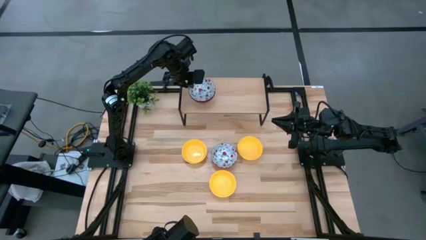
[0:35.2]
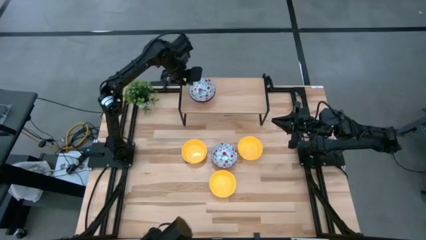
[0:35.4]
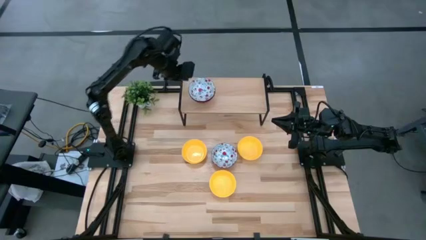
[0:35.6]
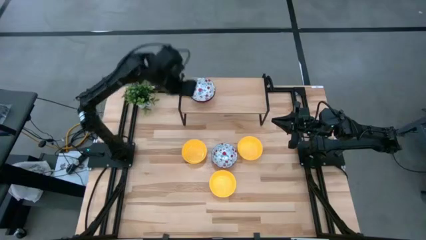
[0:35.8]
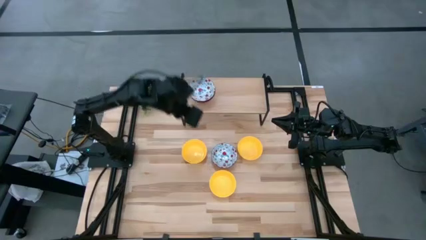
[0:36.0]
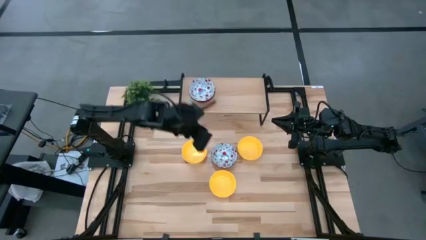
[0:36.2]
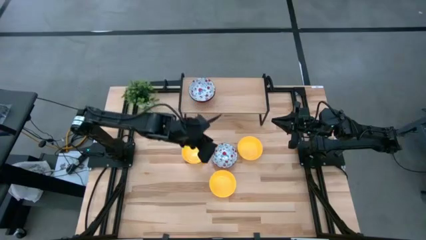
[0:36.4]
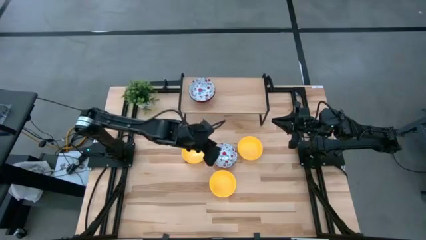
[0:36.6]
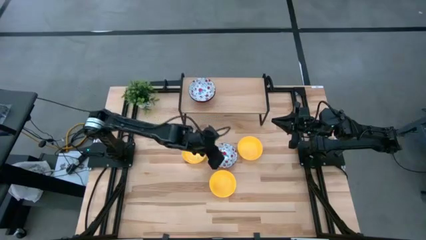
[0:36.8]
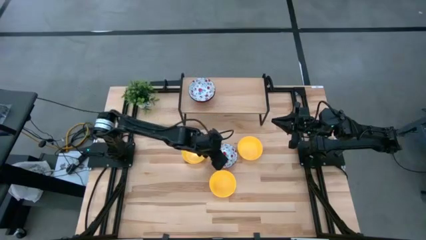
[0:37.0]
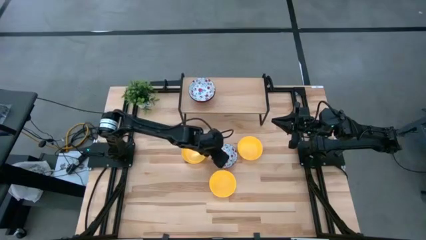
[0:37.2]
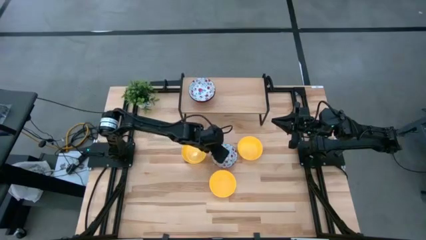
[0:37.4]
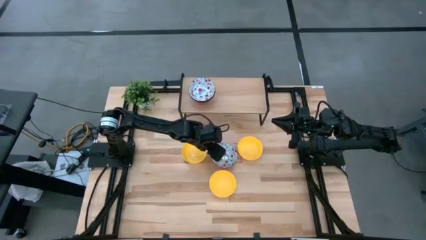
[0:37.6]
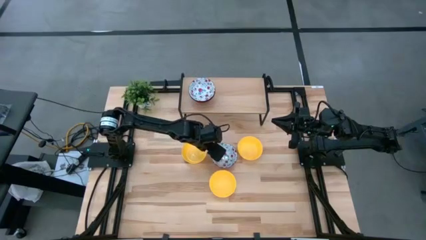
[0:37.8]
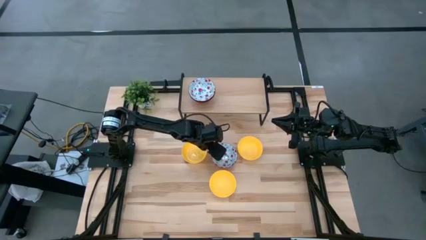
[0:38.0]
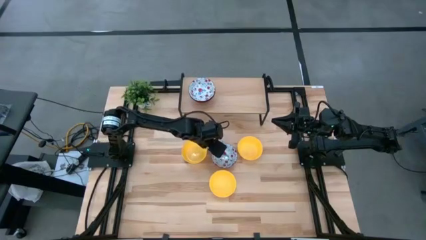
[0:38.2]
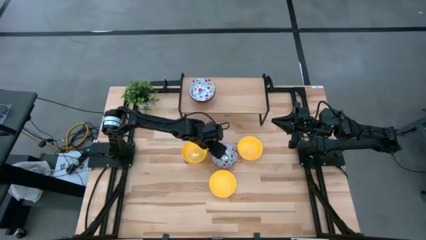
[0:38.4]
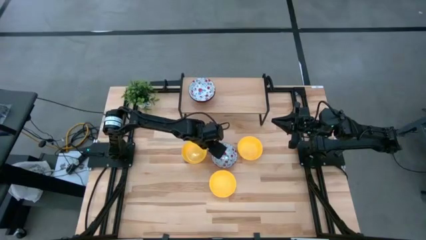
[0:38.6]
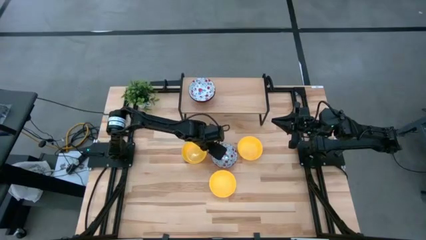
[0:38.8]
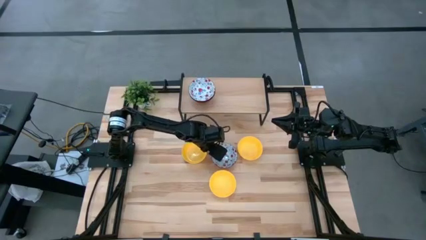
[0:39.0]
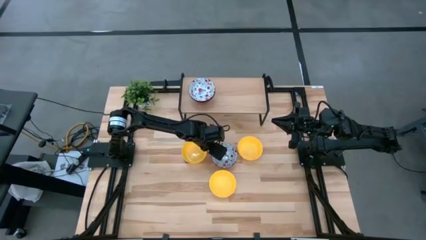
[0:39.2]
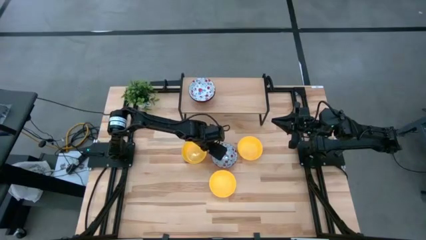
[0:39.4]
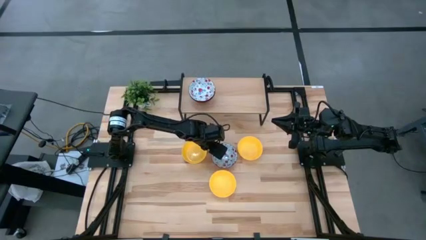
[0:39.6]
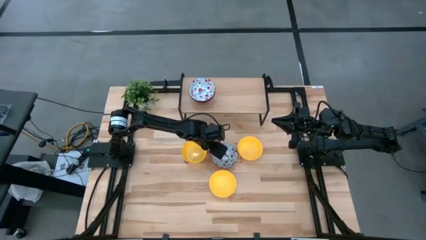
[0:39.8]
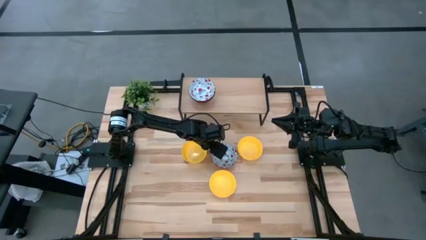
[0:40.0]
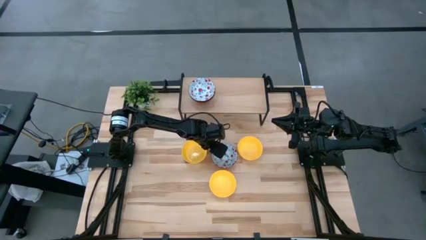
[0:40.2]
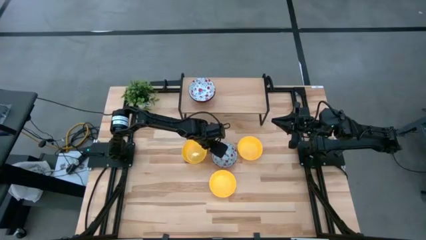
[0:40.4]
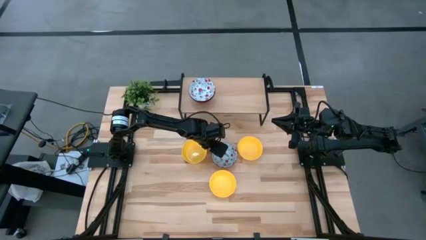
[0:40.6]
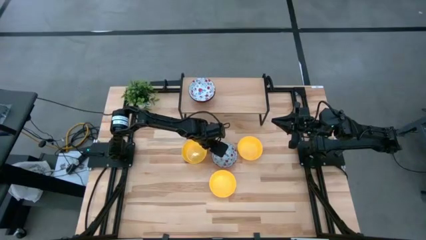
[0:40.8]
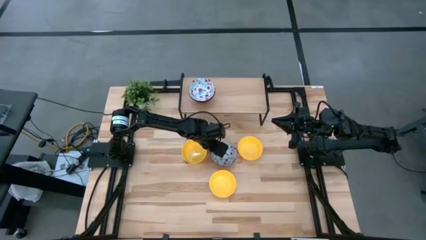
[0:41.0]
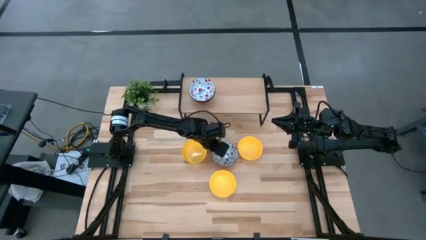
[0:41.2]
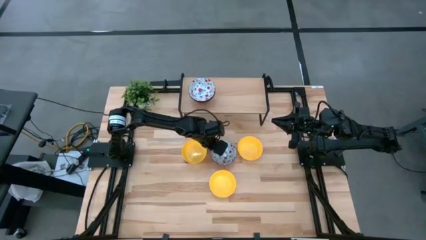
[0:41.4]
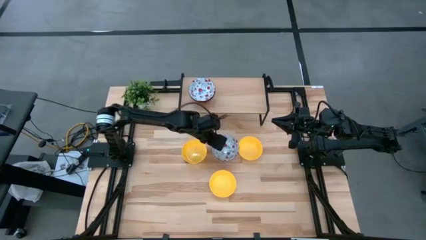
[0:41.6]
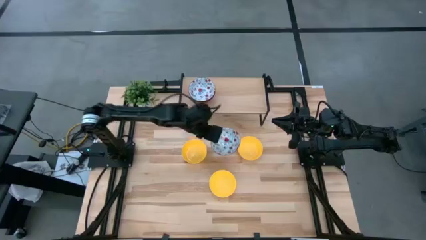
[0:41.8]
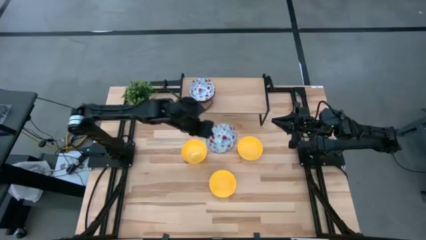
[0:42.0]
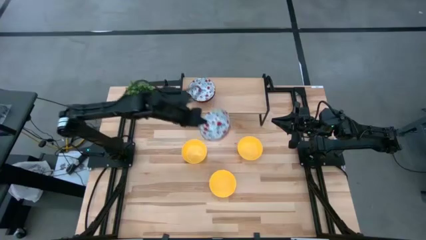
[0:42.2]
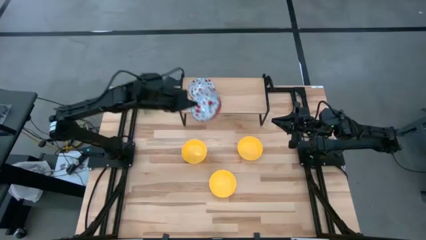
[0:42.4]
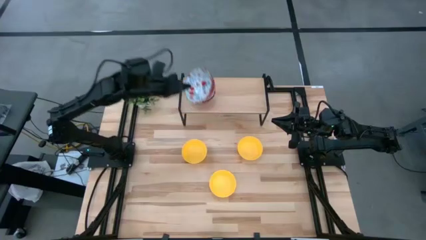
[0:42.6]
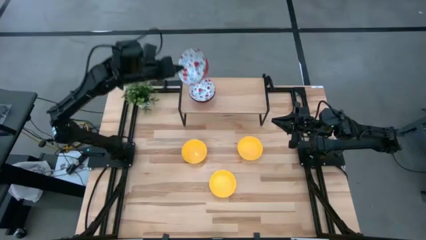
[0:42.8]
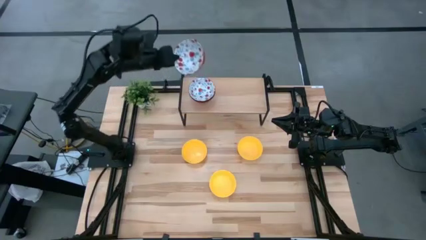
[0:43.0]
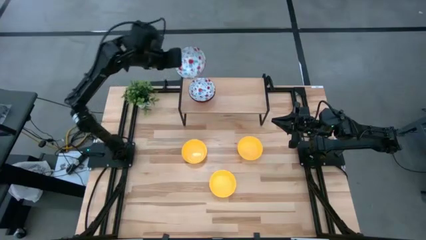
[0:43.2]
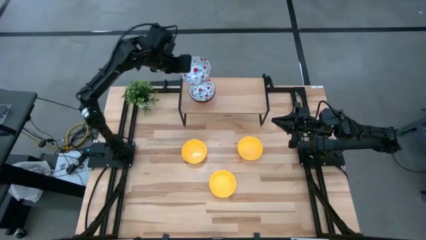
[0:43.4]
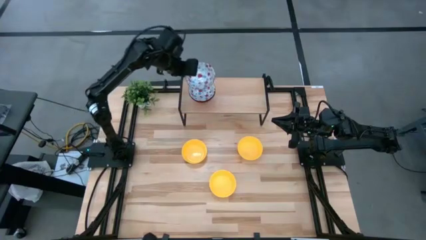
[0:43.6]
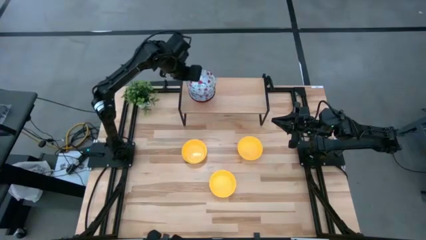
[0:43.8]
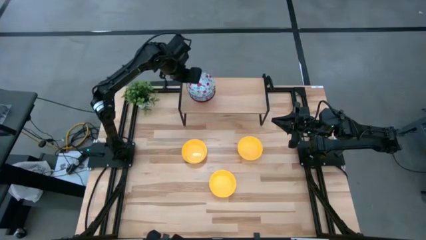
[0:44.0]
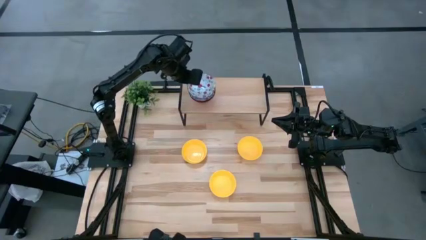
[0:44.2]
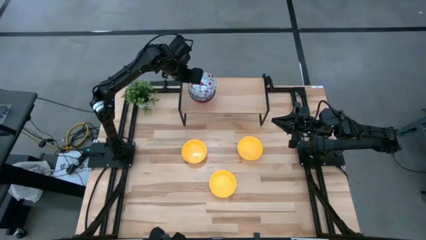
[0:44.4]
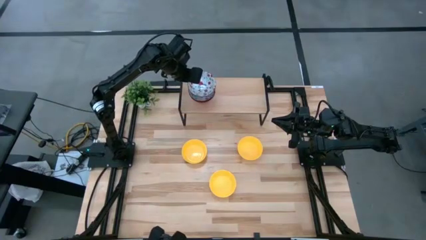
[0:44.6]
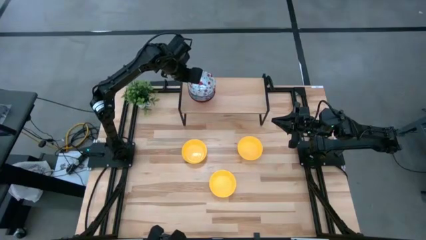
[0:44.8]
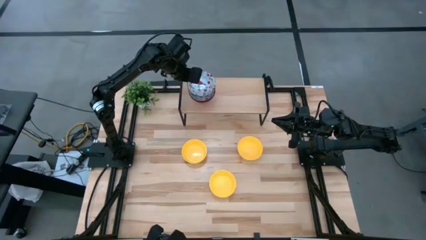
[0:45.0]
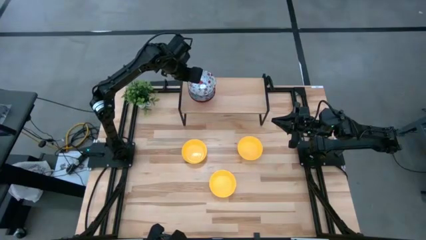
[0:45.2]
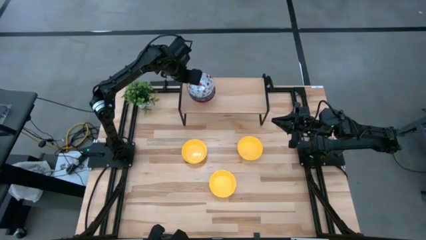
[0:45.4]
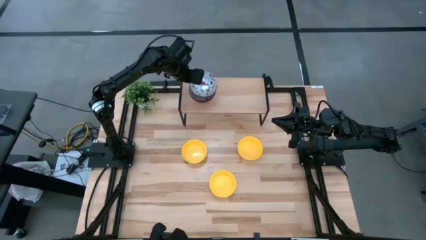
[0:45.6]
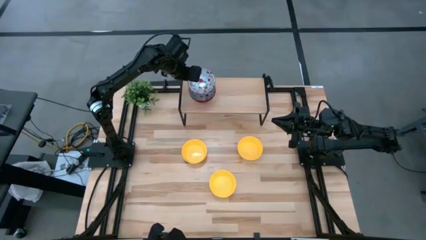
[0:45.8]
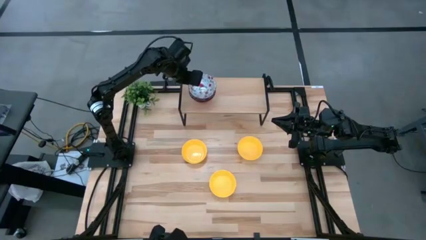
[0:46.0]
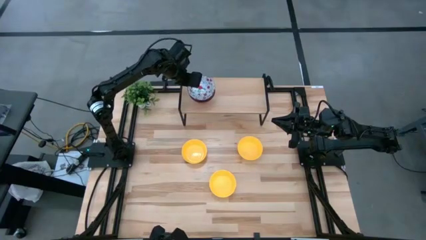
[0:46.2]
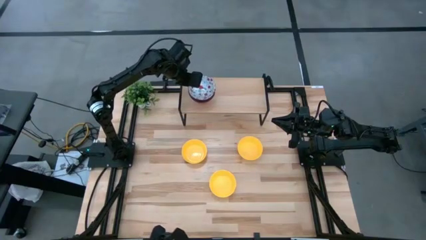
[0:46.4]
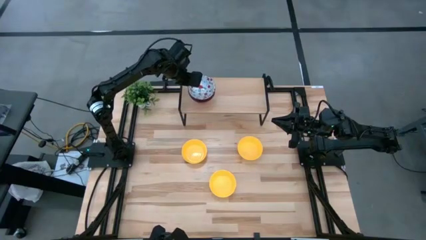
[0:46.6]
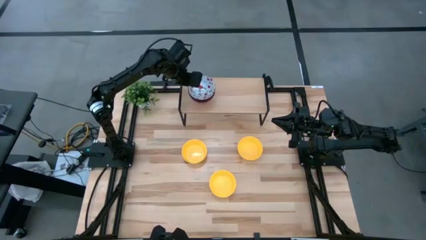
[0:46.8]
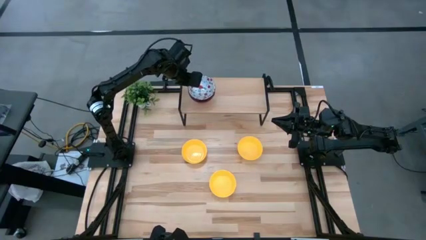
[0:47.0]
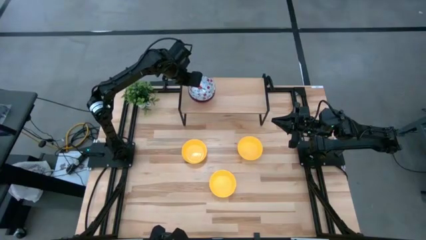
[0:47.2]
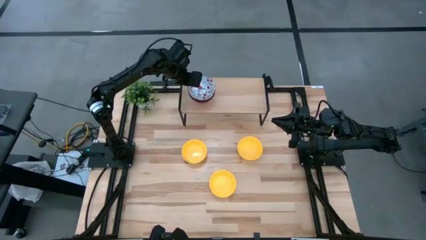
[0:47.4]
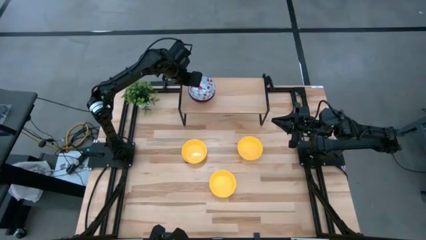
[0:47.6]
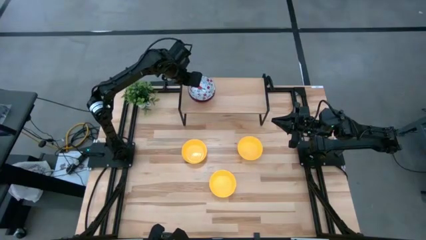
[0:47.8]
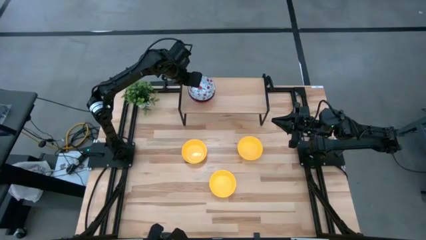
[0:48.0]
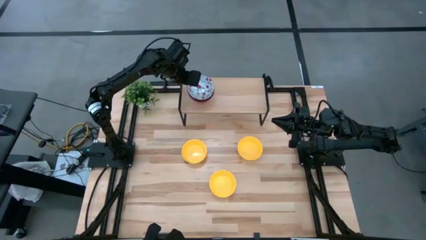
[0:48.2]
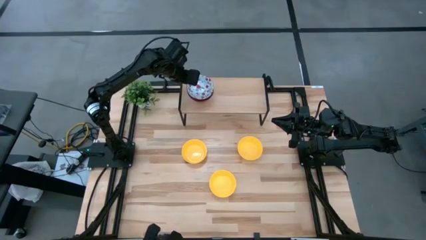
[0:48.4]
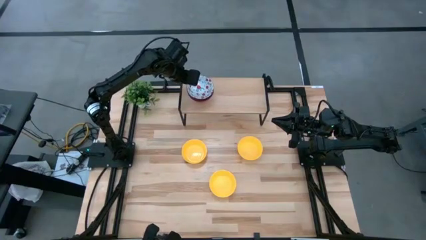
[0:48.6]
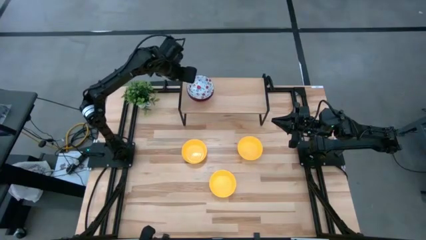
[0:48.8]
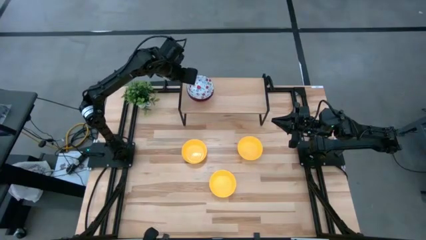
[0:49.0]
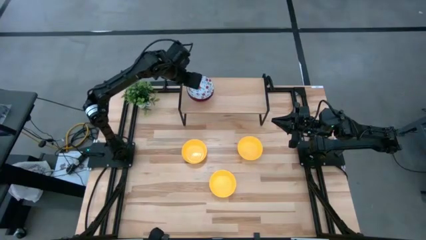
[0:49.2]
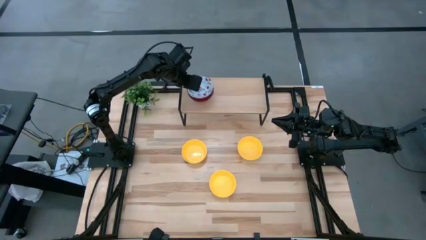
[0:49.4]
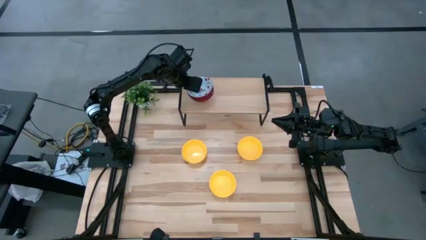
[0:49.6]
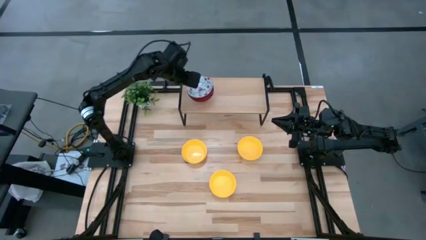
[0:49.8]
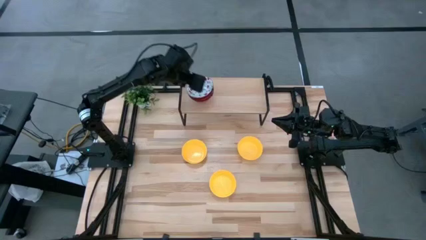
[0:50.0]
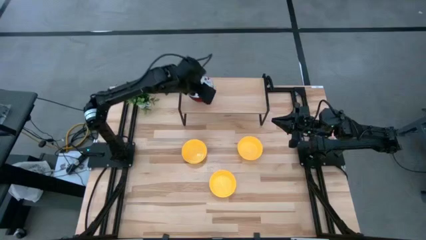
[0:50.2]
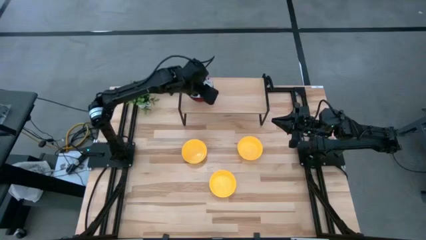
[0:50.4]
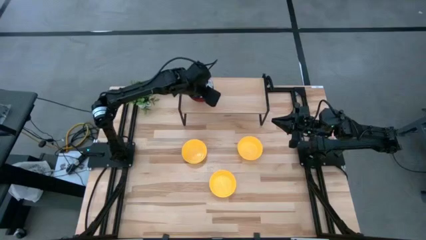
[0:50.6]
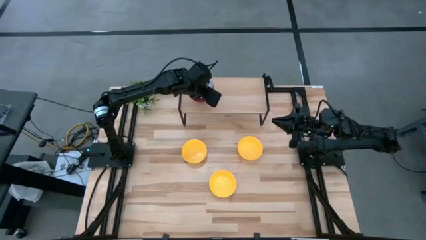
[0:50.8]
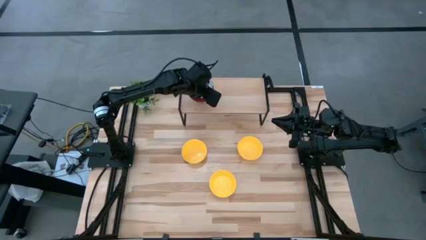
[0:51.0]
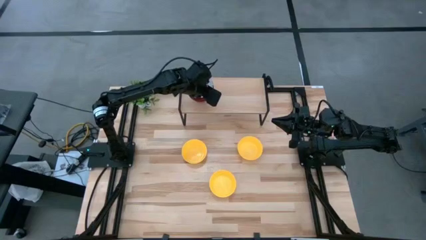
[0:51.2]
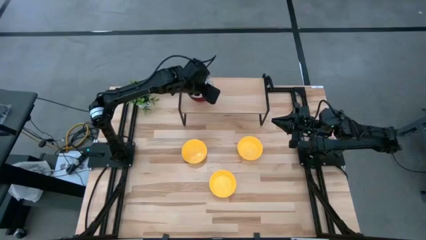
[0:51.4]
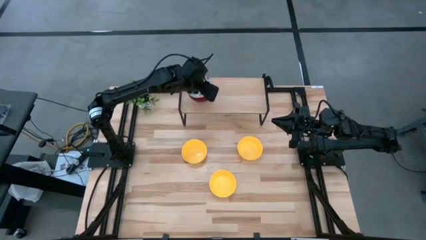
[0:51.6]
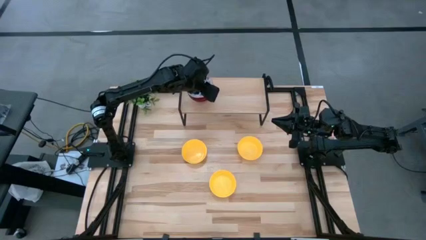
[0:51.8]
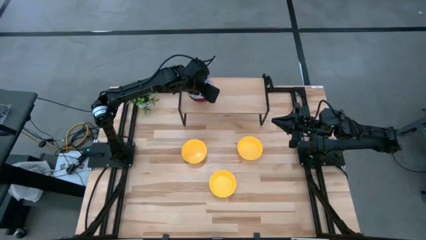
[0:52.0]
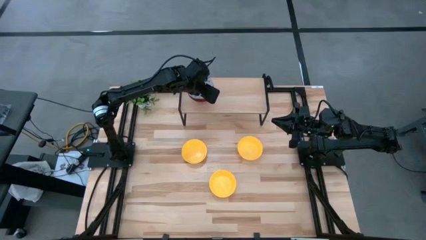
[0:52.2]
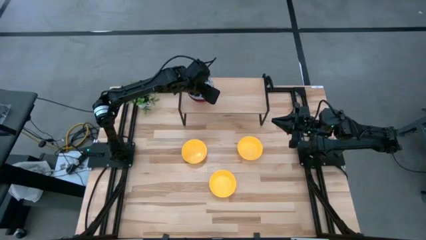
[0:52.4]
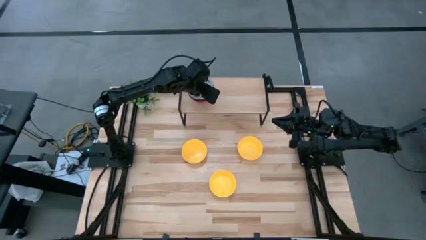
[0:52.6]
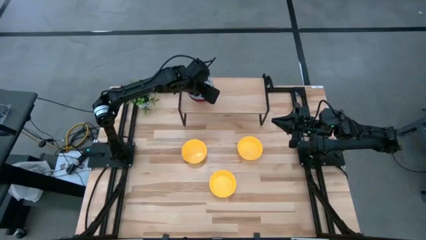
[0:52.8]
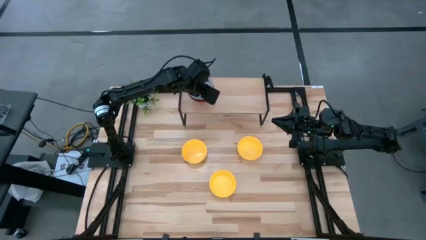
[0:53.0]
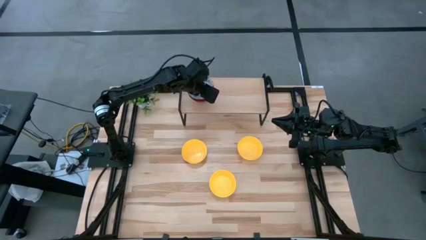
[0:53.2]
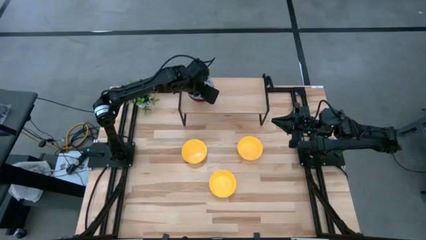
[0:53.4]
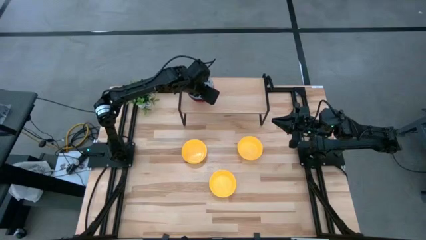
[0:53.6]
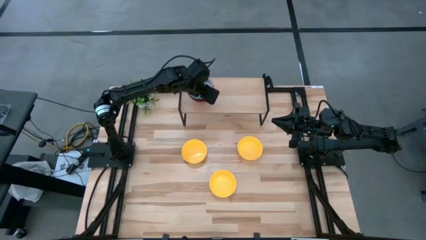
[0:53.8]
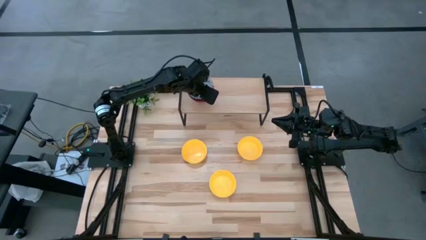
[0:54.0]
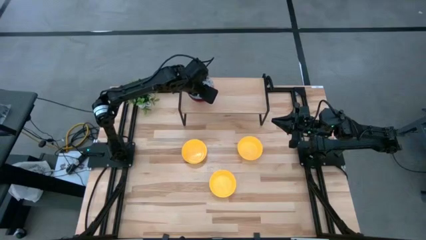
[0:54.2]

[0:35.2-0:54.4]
Task: Pick & Place Mini bowls
Stack the white bowl on the white bowls on the shelf
